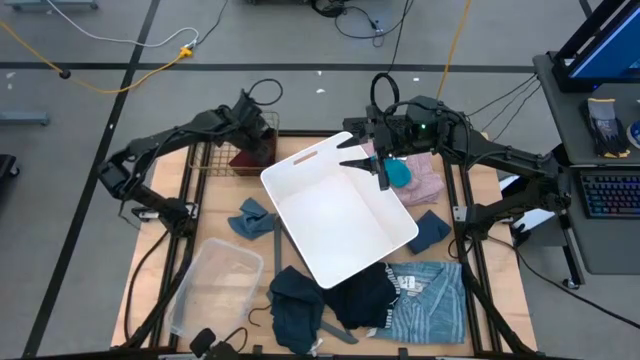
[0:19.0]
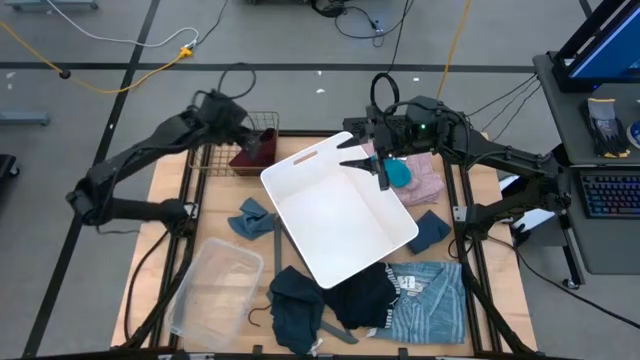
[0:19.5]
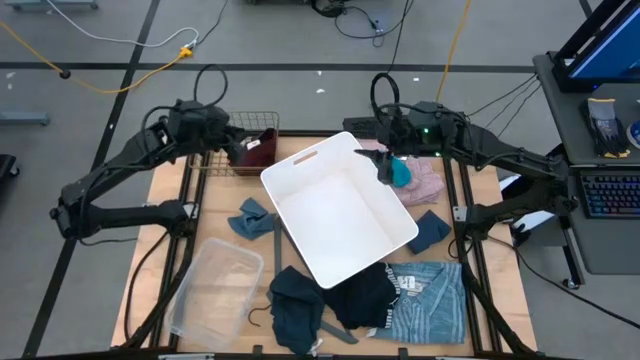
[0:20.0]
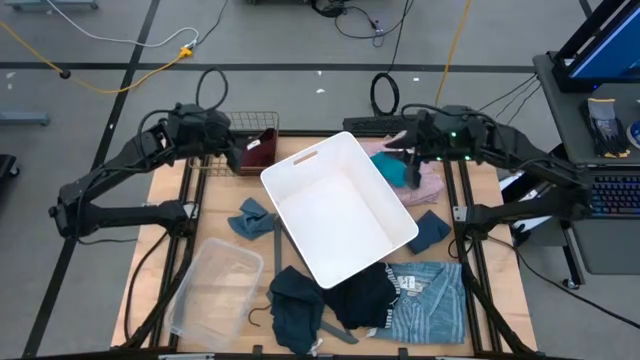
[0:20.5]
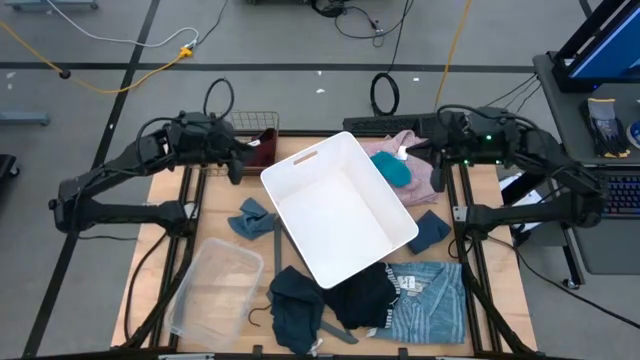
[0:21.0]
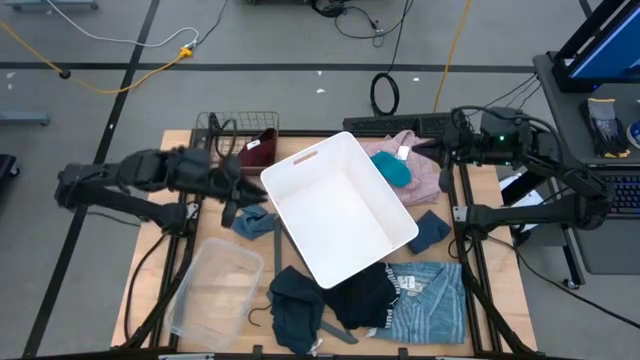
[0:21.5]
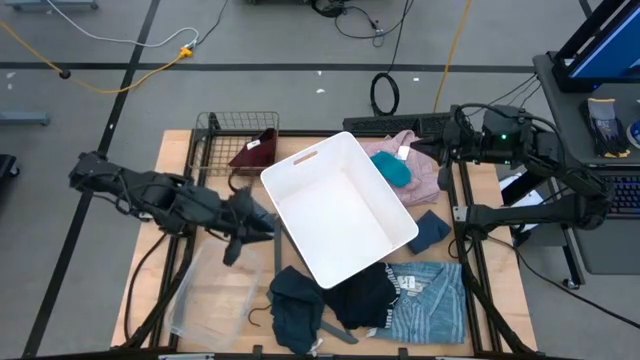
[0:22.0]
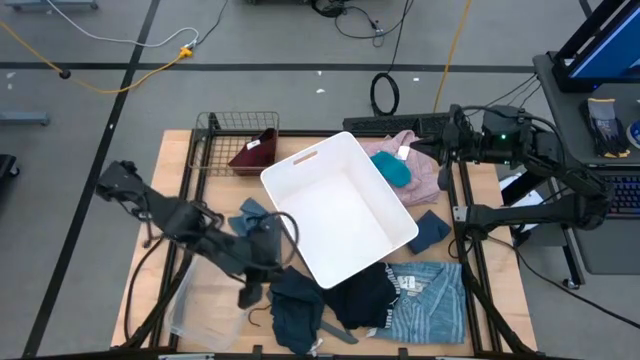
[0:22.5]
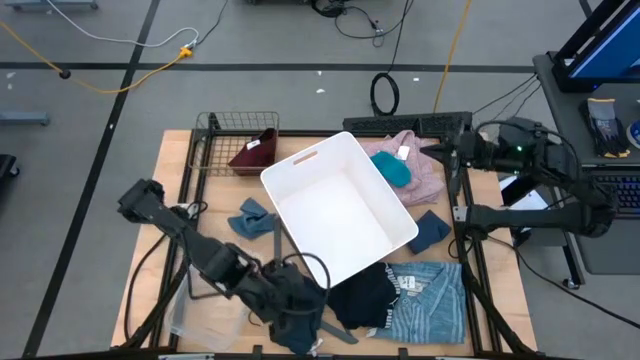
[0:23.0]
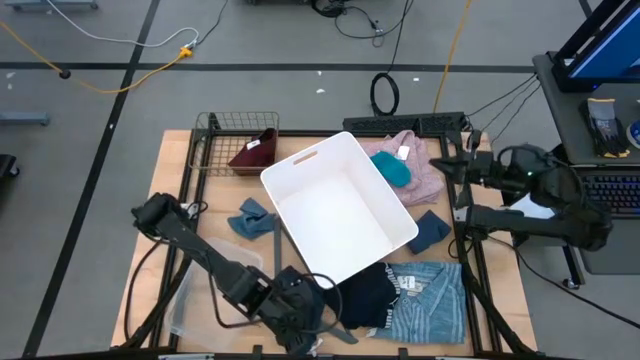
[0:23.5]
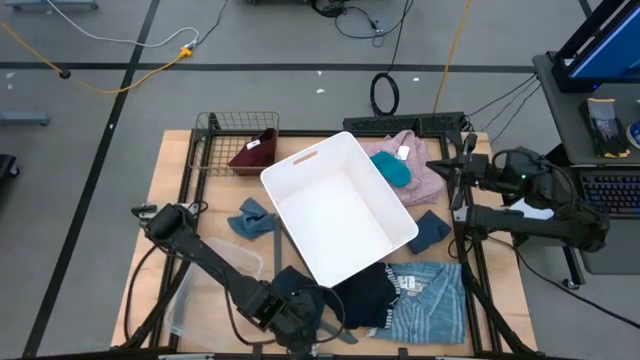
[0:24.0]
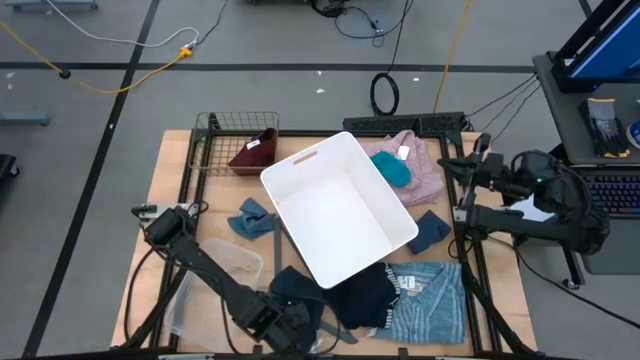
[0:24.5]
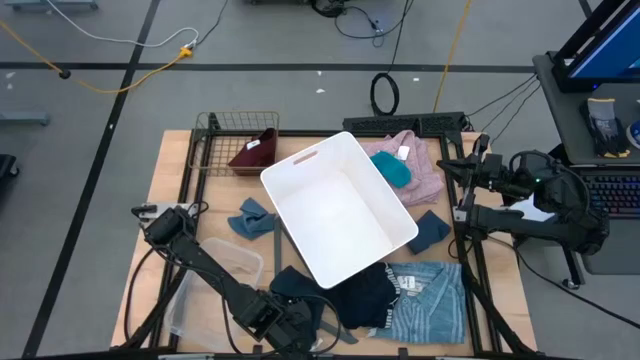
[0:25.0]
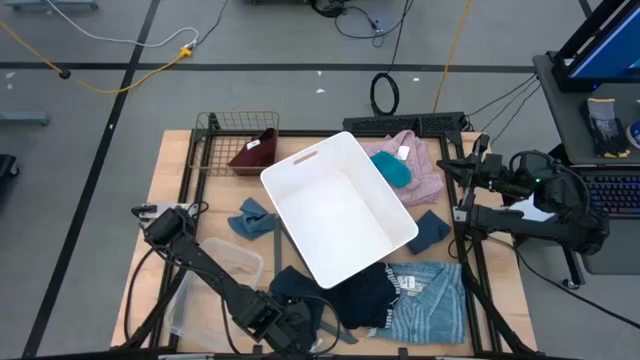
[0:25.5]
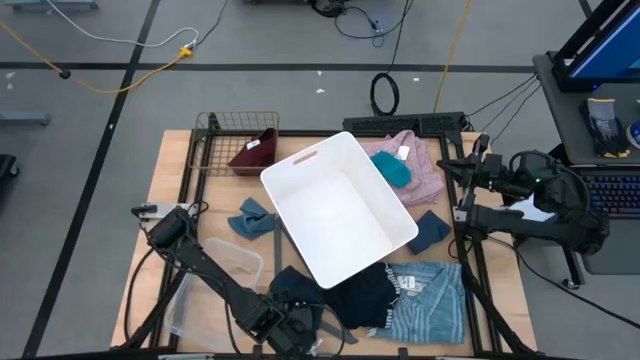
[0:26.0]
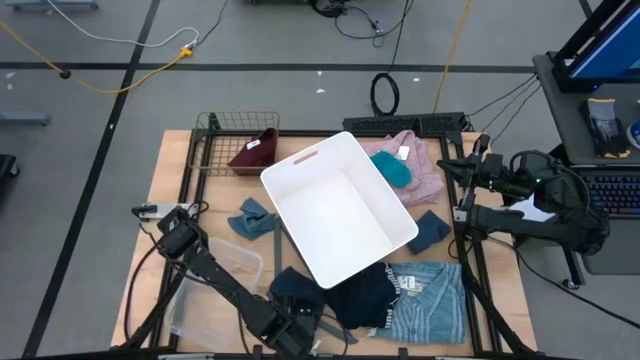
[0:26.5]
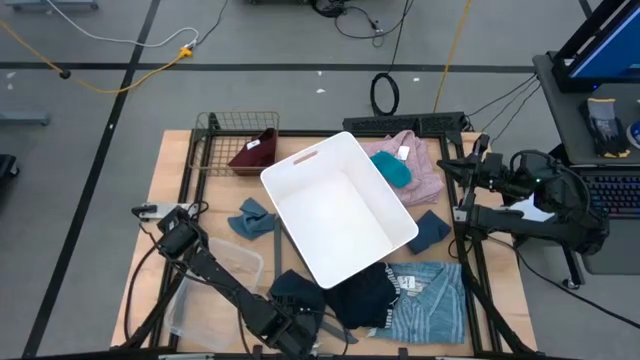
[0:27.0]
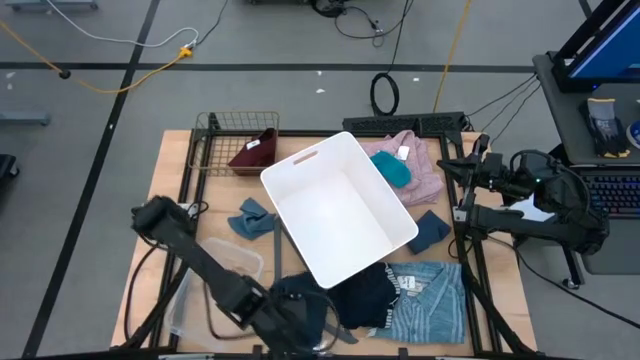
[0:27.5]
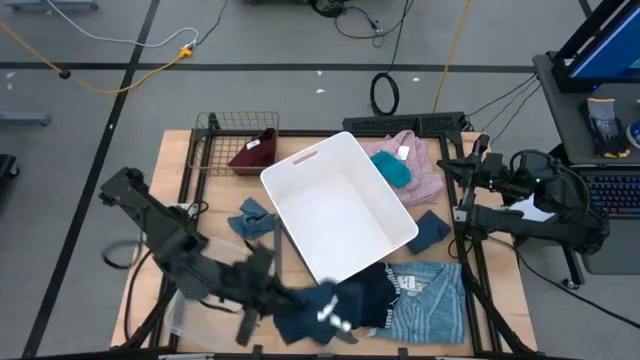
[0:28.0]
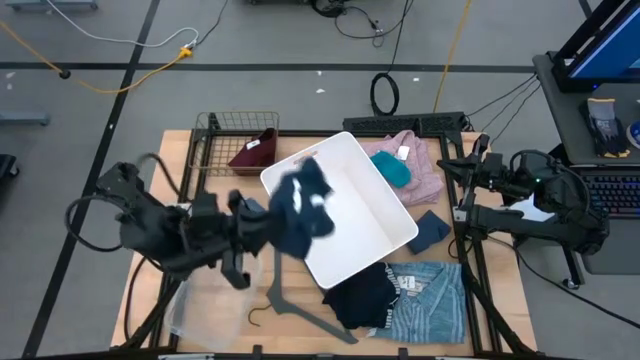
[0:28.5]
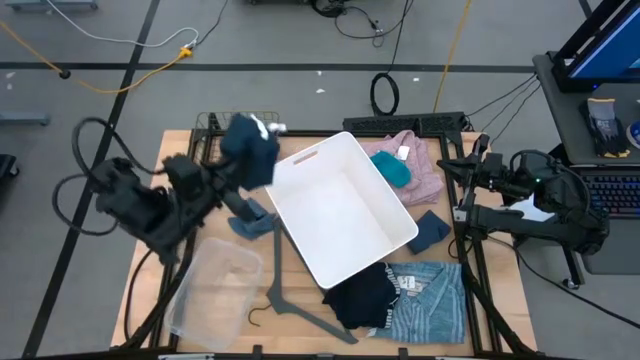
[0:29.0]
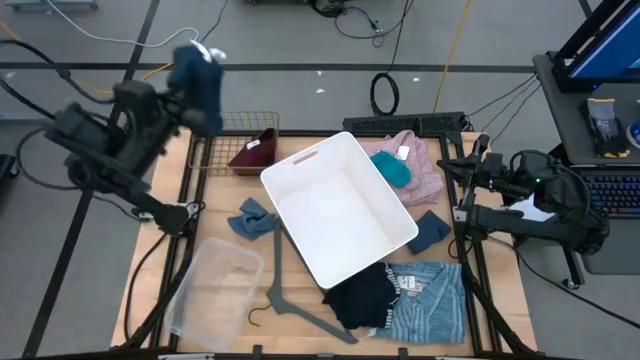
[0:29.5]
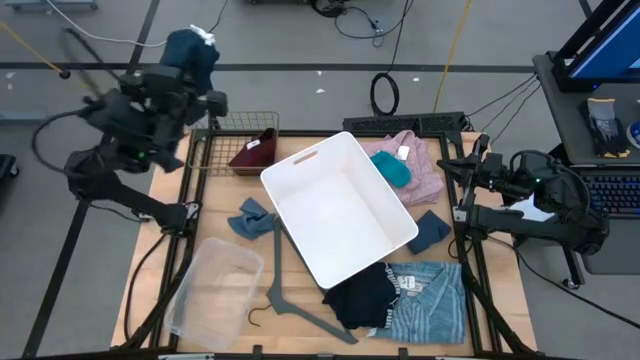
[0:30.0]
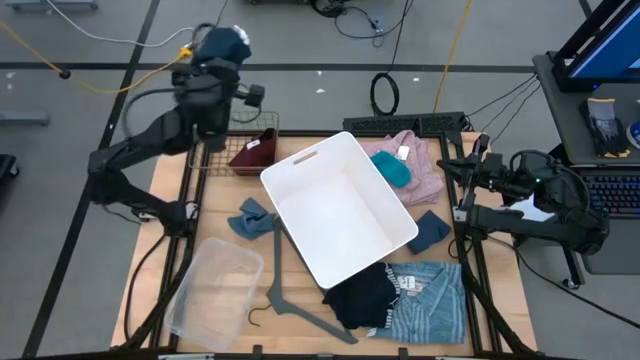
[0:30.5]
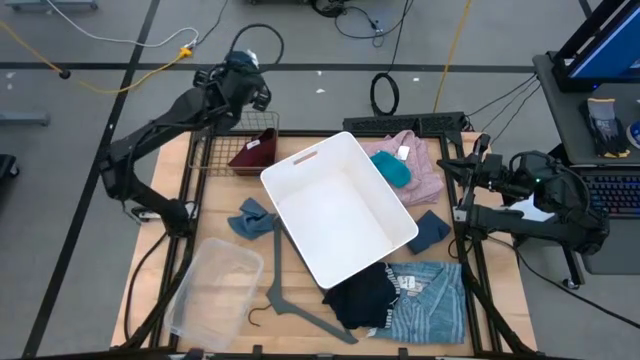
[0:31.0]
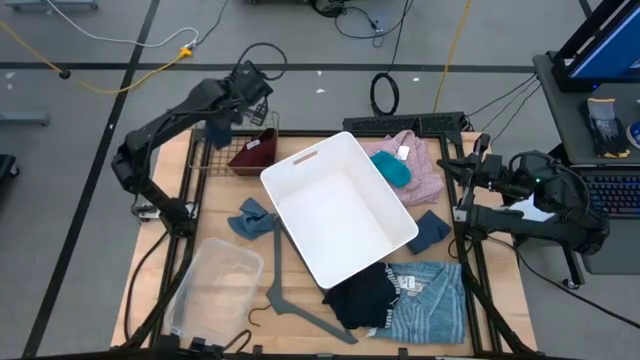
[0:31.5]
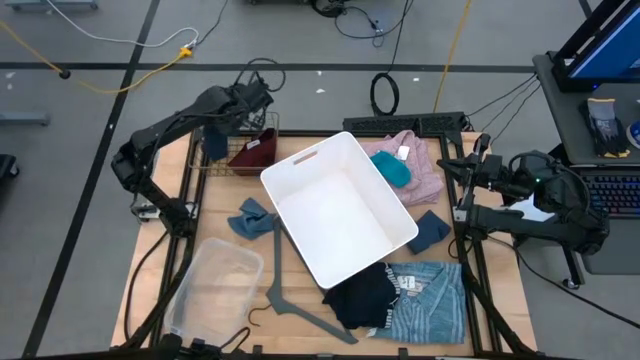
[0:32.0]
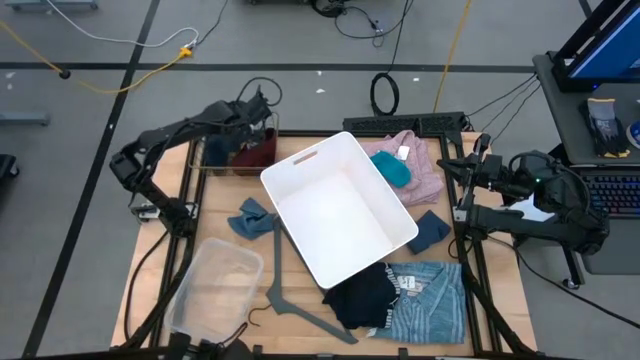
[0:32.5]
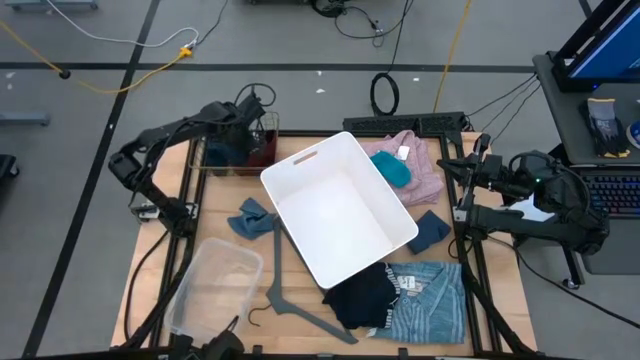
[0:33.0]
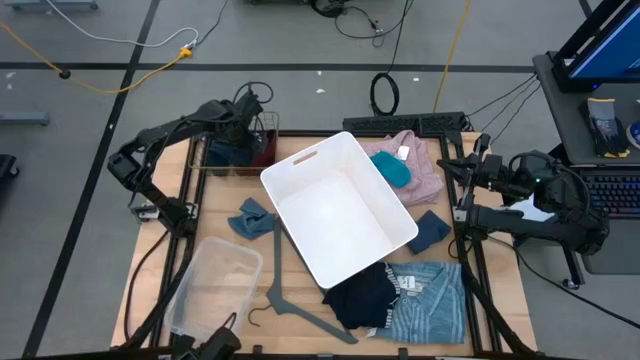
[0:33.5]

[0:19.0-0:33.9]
Task: Pick & Place Cloths
Put the blue shorts into the mesh basket

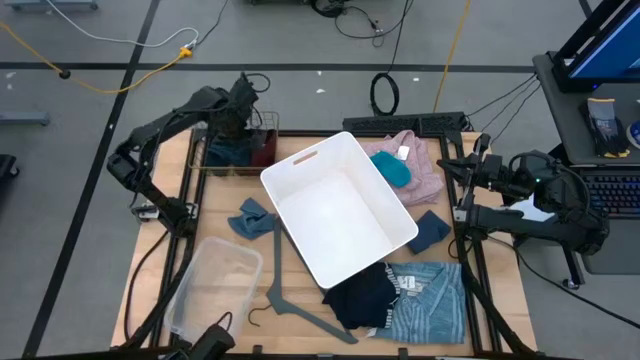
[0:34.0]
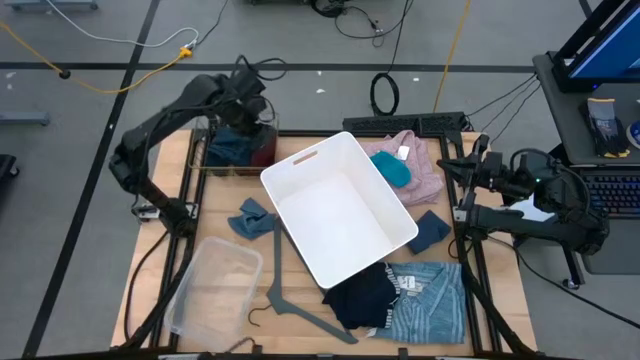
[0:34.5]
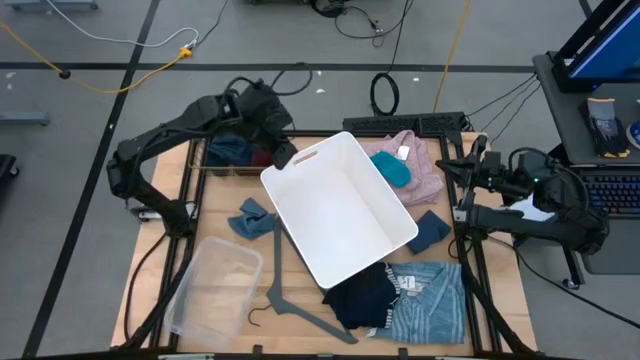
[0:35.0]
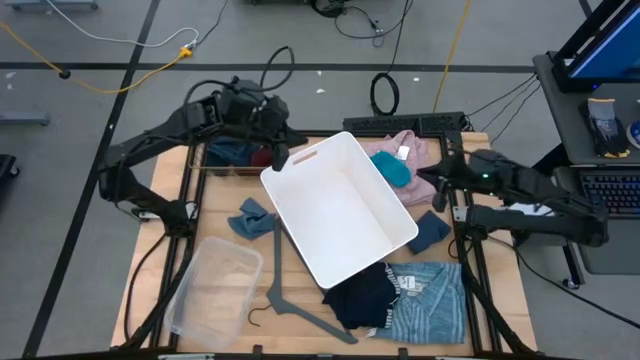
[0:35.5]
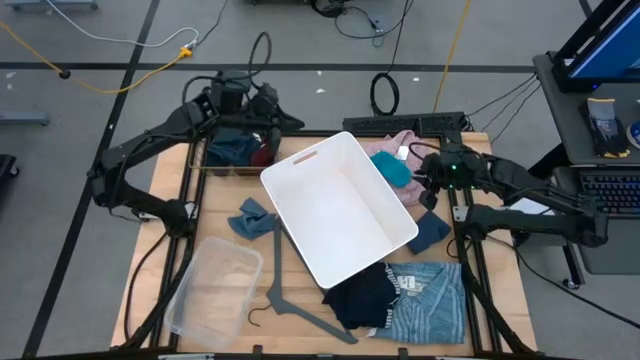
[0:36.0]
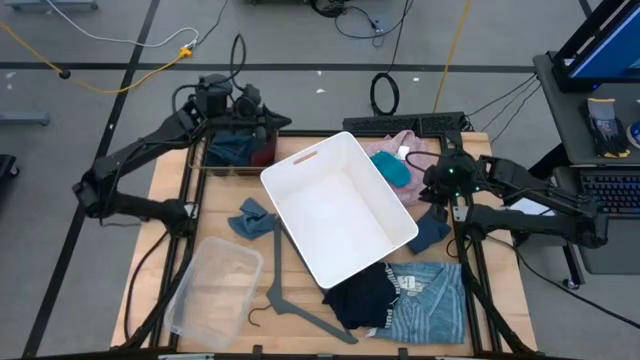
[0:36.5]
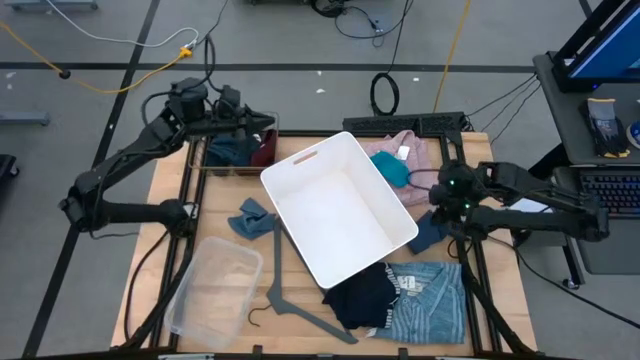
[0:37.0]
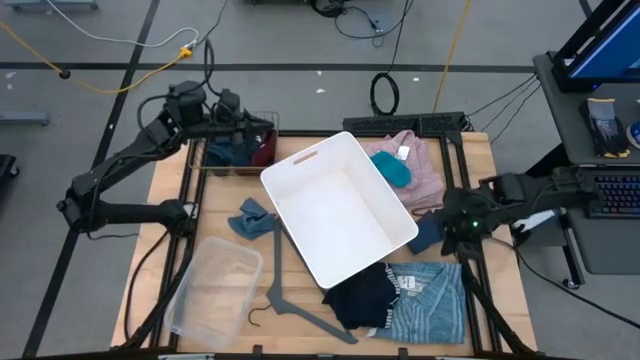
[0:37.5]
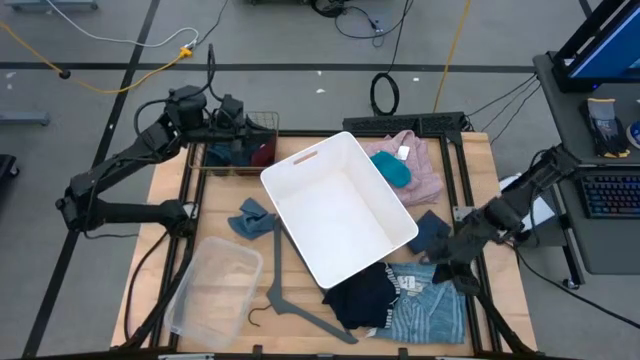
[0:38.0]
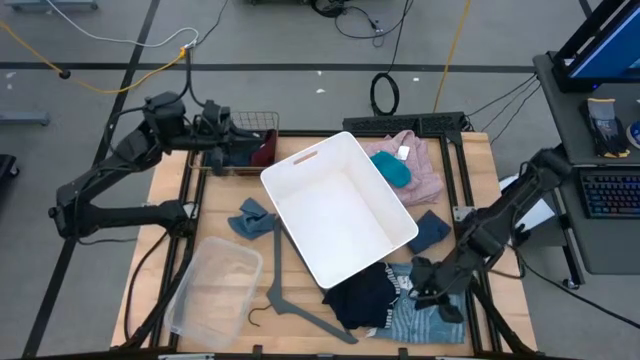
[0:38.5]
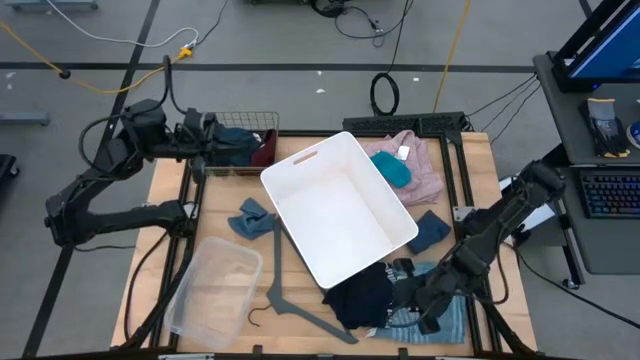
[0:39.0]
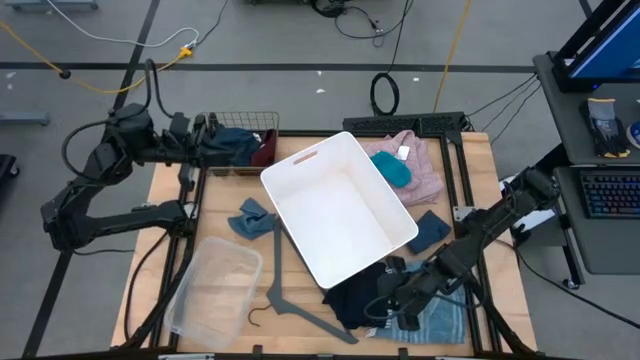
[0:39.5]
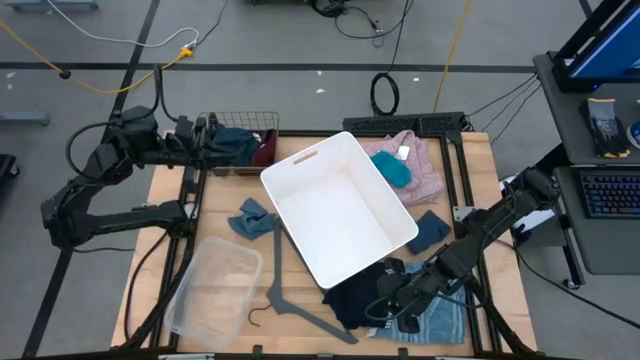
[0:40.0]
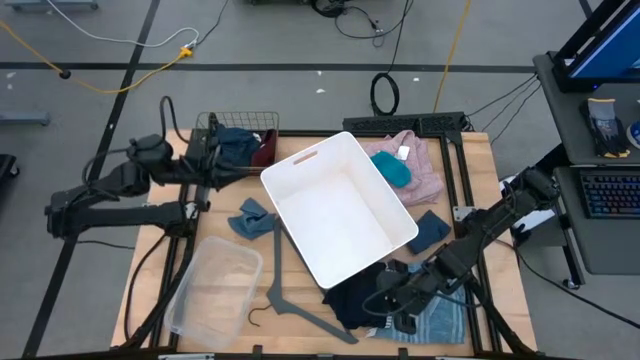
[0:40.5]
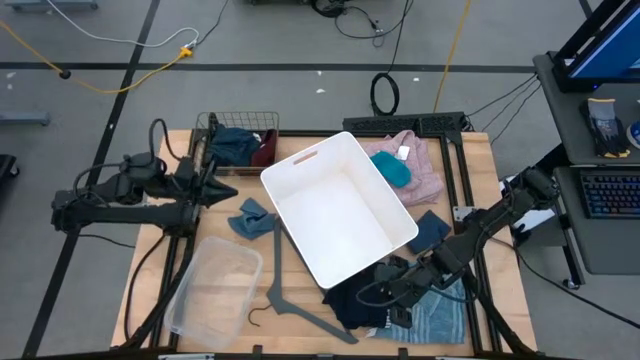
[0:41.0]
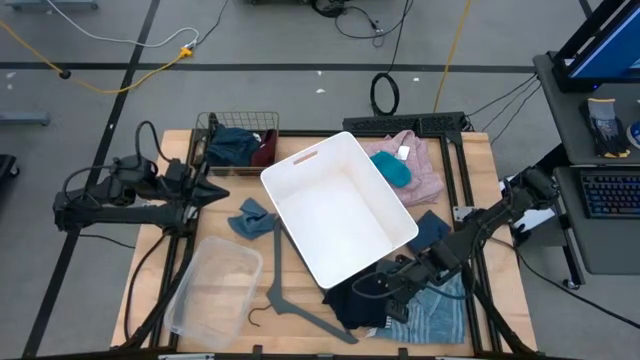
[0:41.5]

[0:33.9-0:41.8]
Put the blue boxer shorts into the mesh basket
